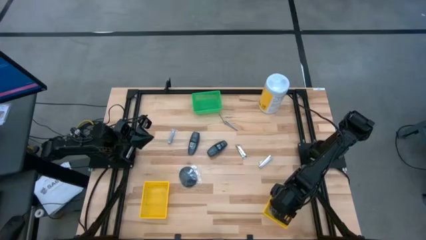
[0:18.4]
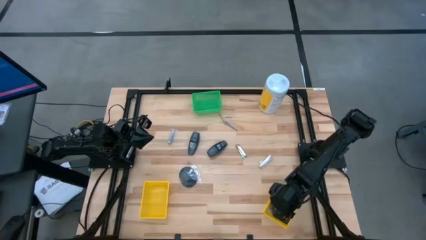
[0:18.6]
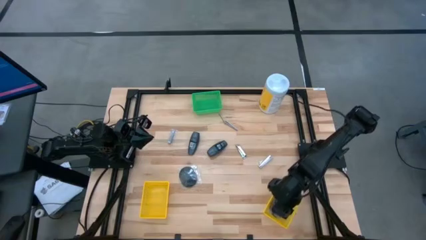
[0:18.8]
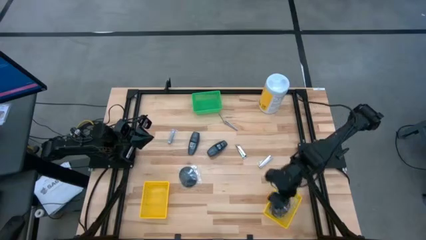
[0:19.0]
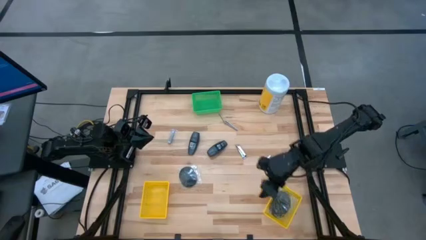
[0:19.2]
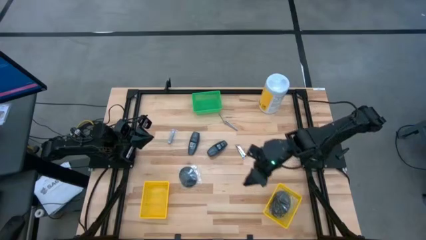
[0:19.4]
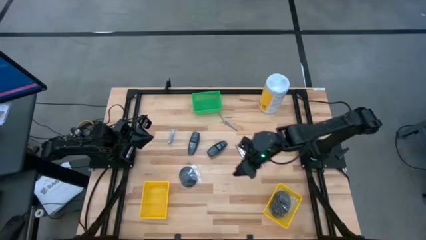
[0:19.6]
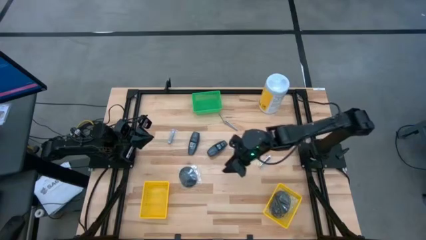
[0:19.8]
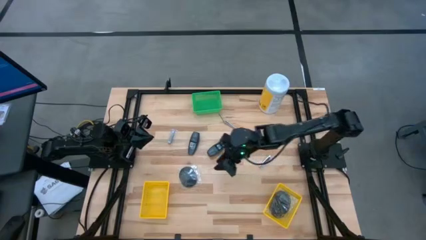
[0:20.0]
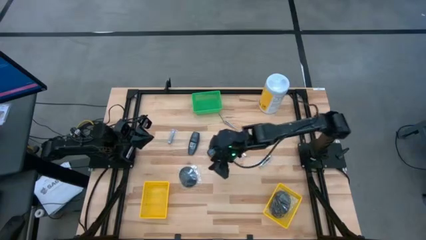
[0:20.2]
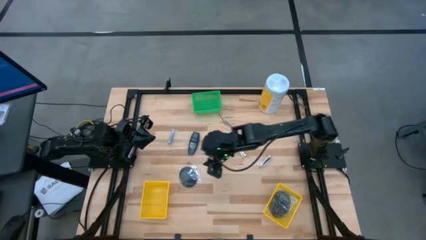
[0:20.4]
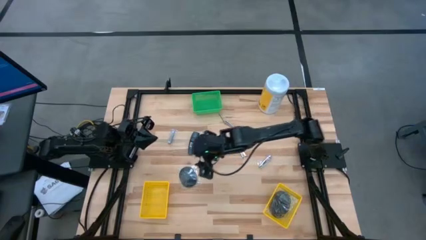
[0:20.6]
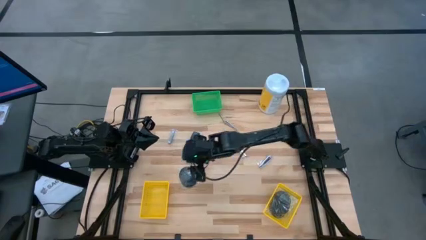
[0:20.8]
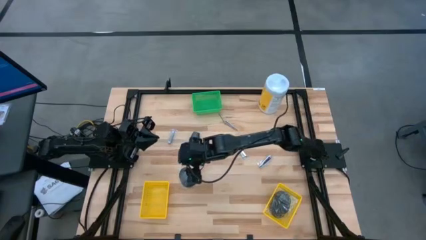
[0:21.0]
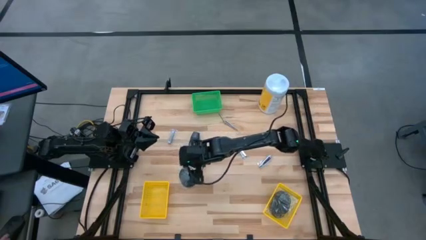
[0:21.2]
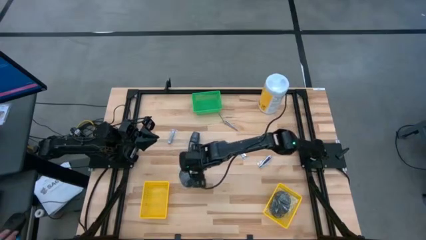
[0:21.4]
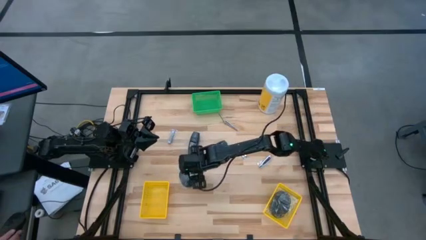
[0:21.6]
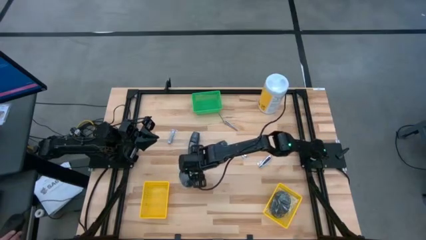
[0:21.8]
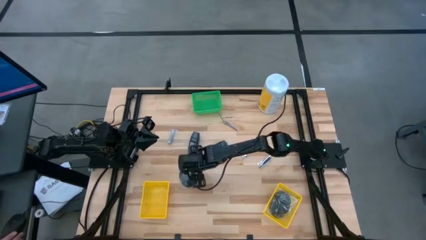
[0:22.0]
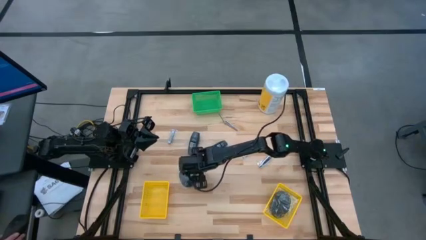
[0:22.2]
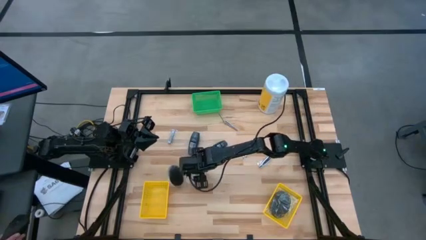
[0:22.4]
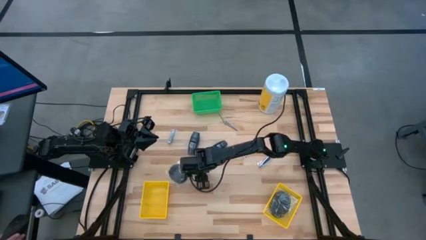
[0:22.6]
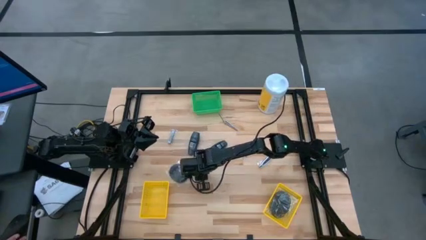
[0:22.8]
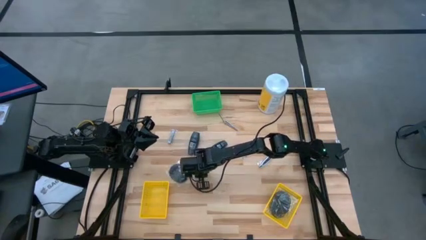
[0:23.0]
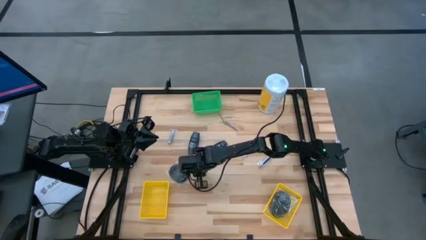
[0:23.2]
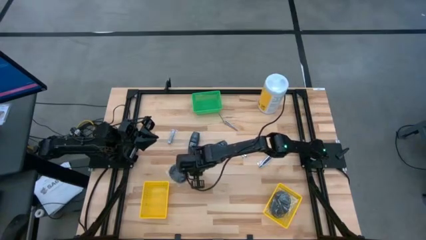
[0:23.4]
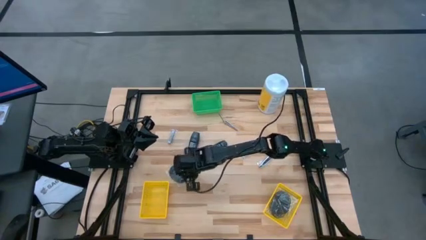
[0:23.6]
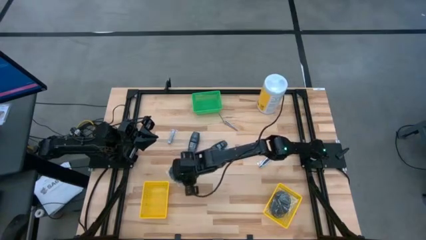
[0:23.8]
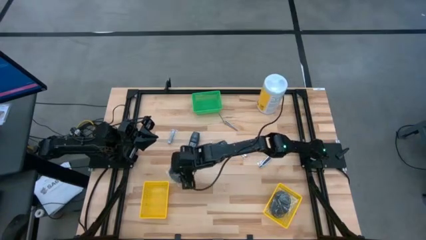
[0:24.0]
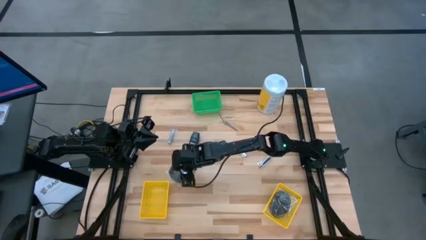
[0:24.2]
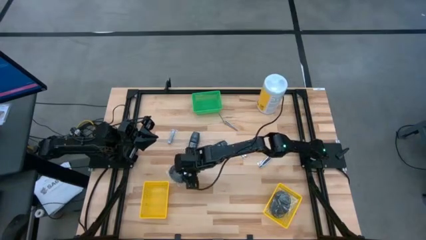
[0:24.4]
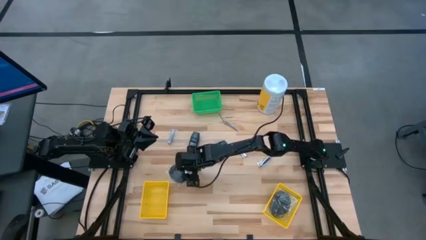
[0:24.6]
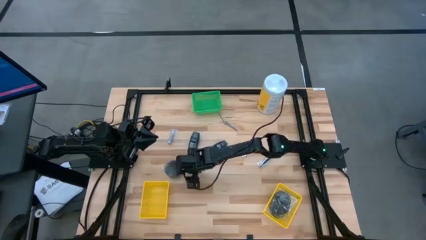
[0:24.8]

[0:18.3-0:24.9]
Task: Pick & Place Travel size toiletries
Put the black hairbrush into the right yellow bin

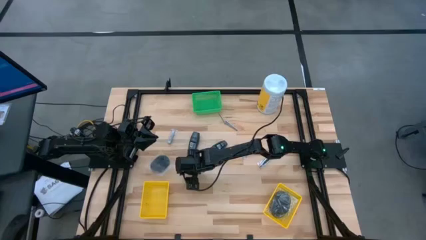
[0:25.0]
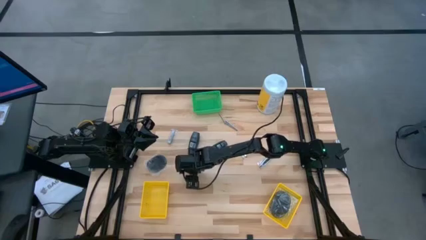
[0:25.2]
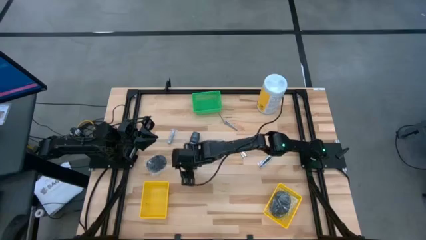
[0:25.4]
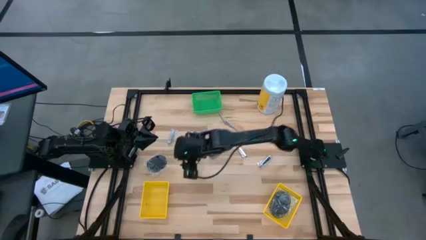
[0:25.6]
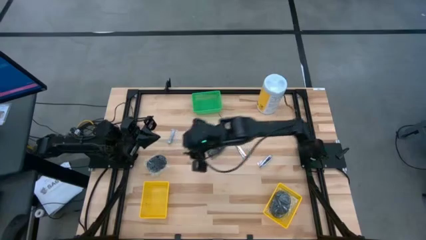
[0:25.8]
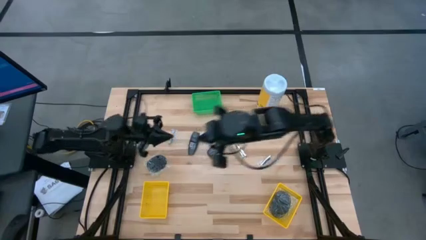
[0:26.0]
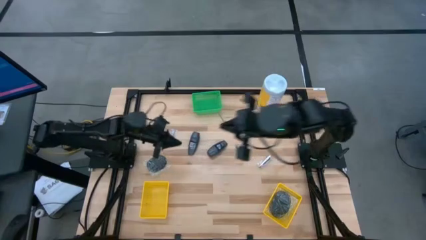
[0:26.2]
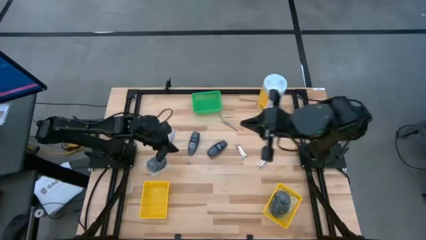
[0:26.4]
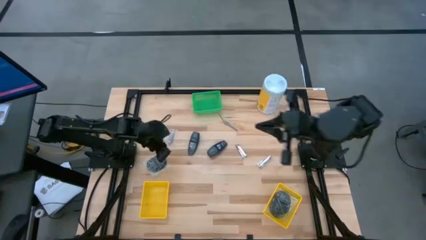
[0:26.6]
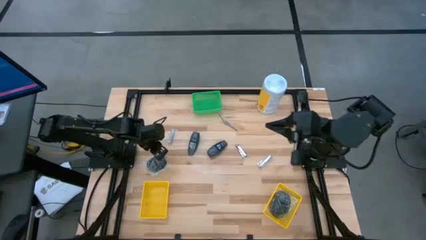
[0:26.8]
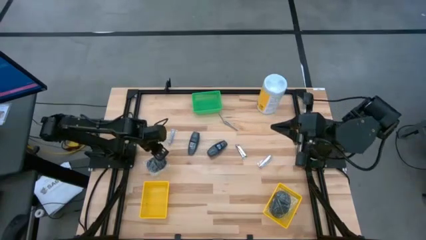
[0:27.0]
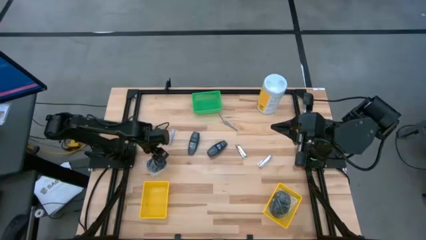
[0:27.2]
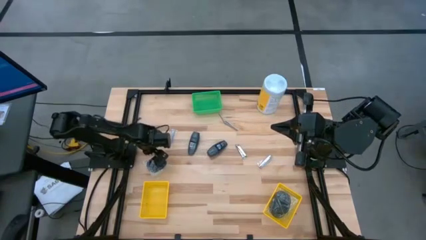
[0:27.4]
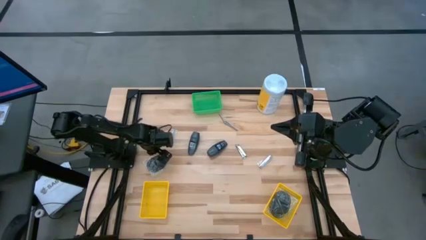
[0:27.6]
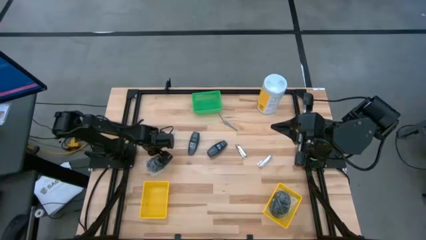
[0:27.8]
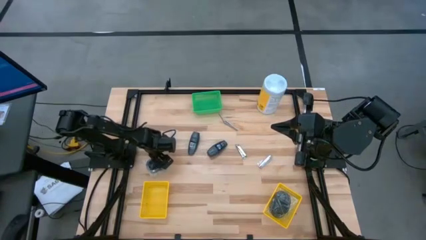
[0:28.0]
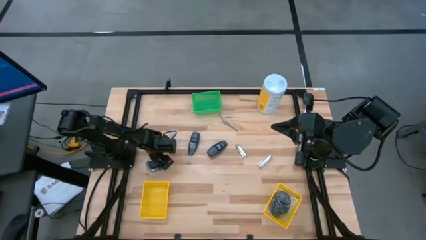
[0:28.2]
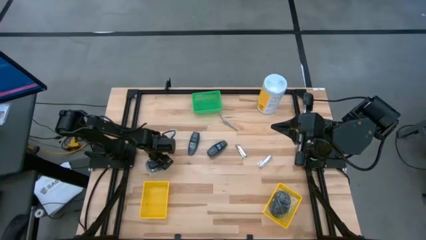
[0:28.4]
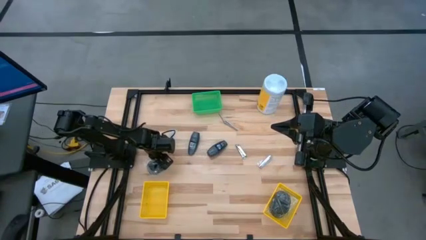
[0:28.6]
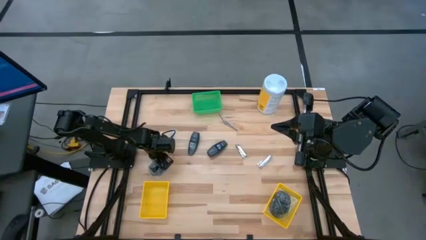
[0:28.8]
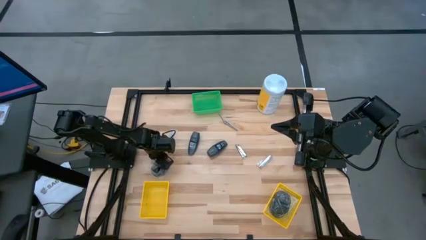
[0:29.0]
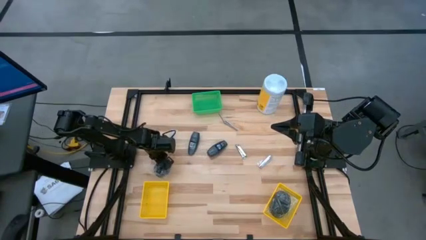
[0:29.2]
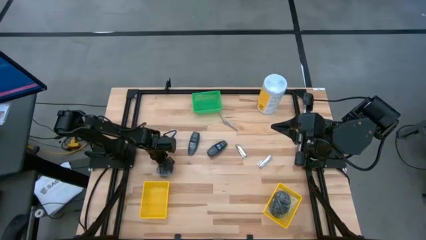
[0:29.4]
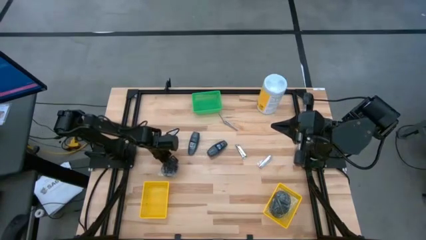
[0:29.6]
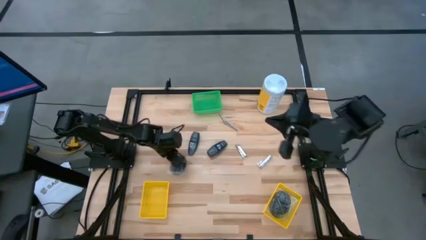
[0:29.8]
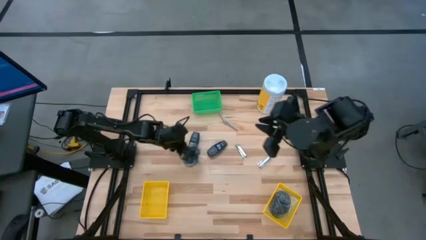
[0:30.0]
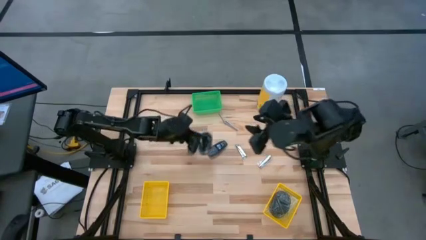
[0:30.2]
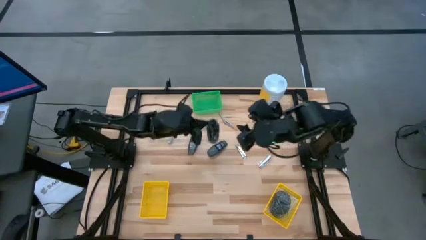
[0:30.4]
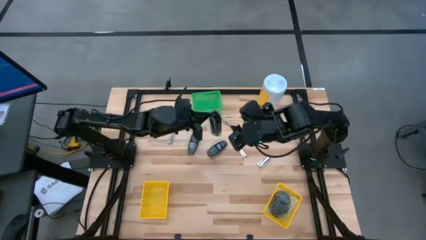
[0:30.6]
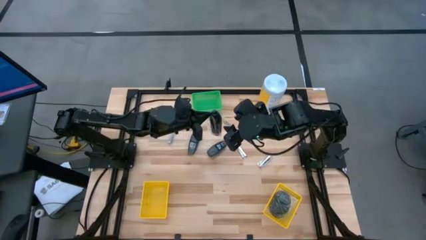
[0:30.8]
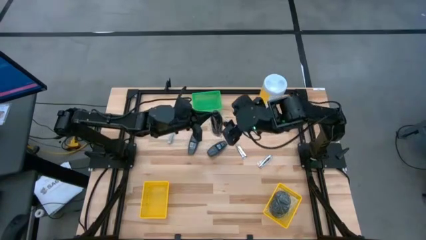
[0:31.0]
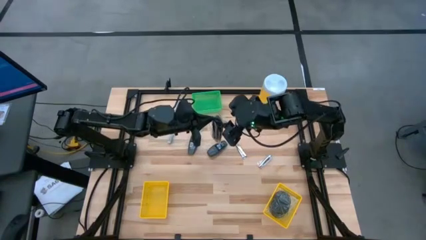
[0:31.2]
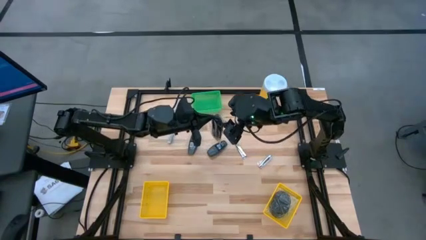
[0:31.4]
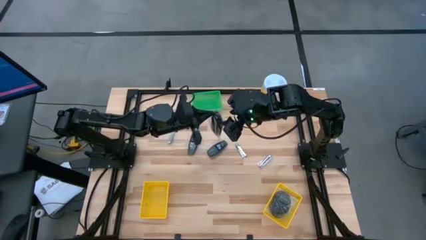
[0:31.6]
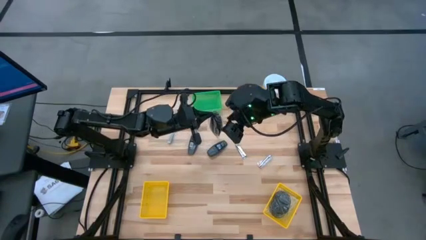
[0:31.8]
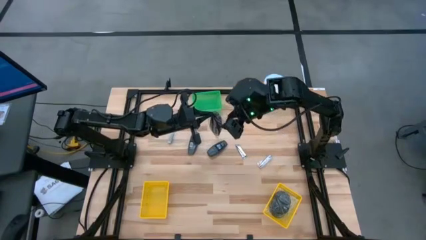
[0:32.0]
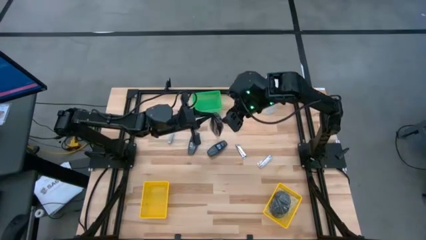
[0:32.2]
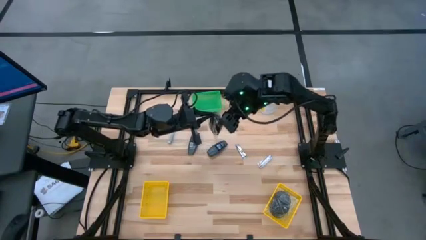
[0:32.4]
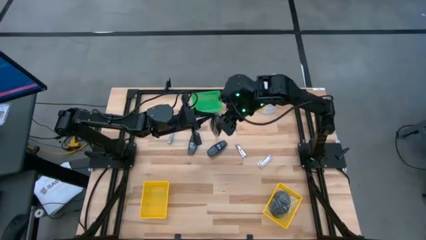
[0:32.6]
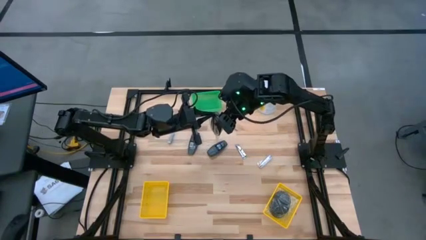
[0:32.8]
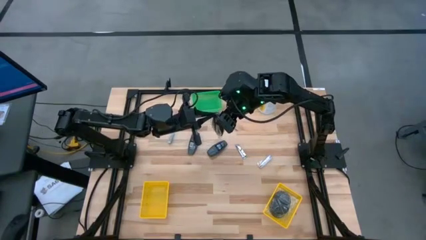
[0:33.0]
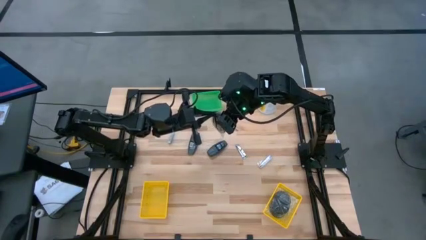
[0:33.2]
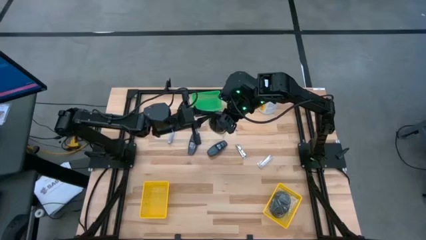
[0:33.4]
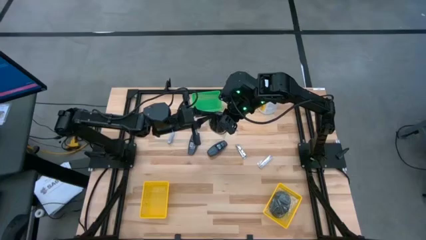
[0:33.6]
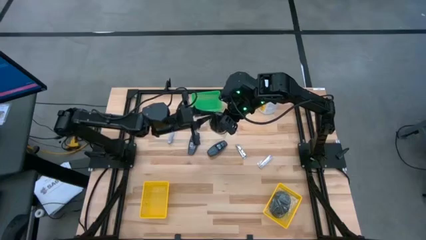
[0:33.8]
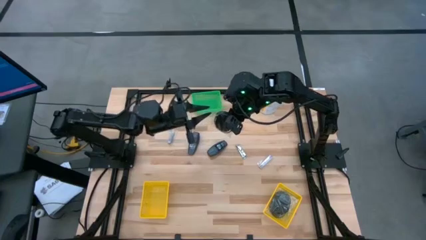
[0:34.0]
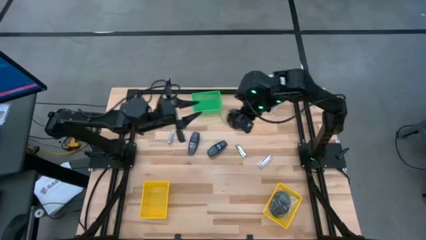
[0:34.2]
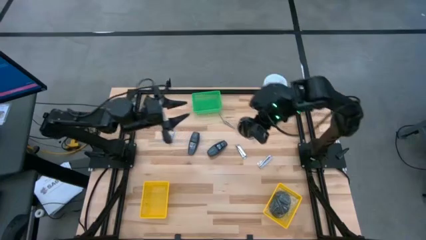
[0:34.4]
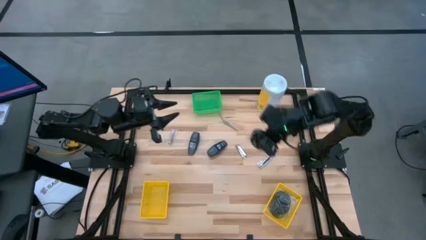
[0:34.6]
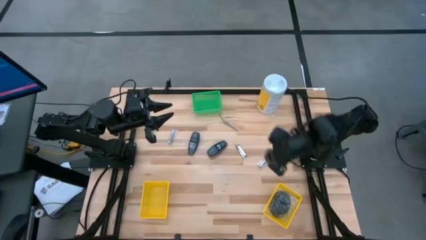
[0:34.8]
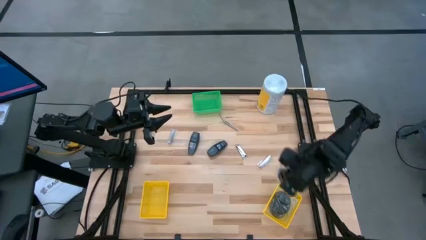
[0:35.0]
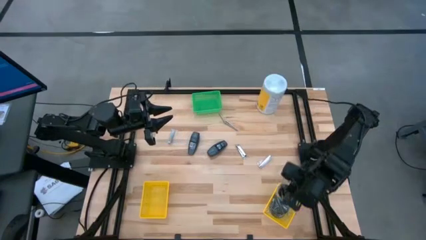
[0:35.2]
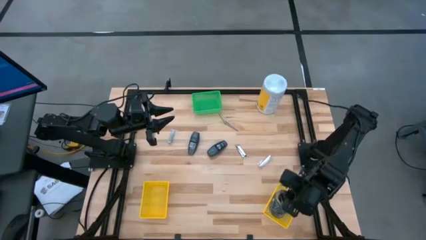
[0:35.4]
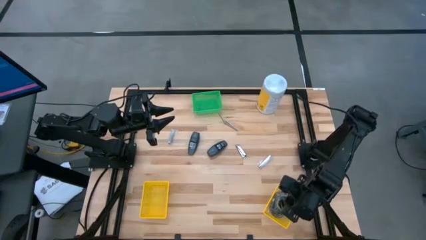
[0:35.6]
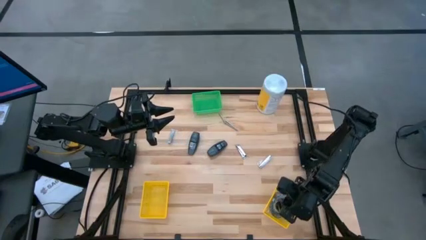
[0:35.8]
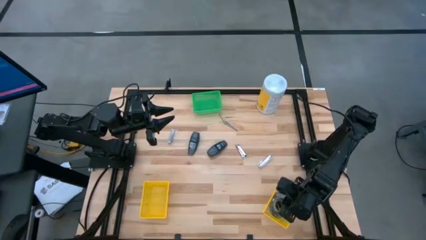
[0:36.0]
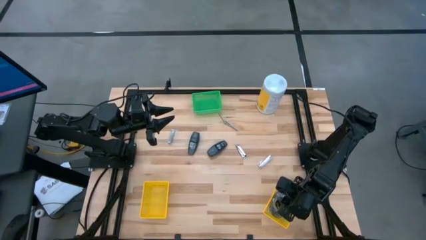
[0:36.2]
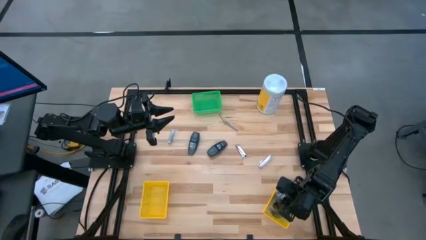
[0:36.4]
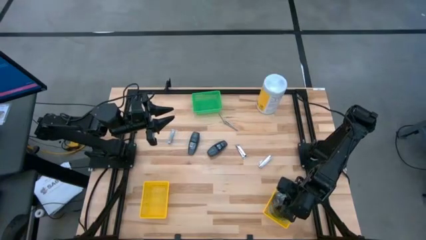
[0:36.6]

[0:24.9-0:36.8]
Put the black hairbrush into the right yellow bin
